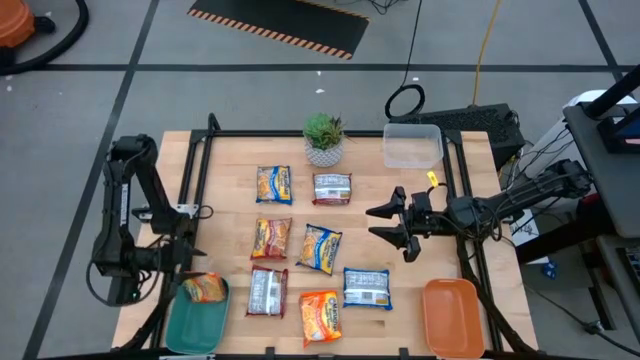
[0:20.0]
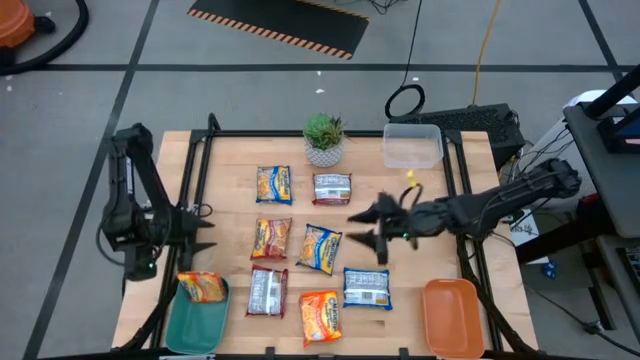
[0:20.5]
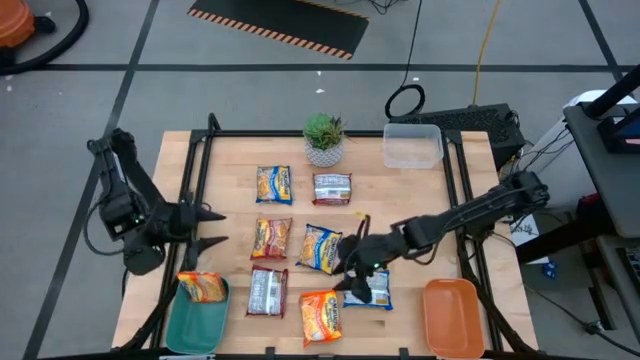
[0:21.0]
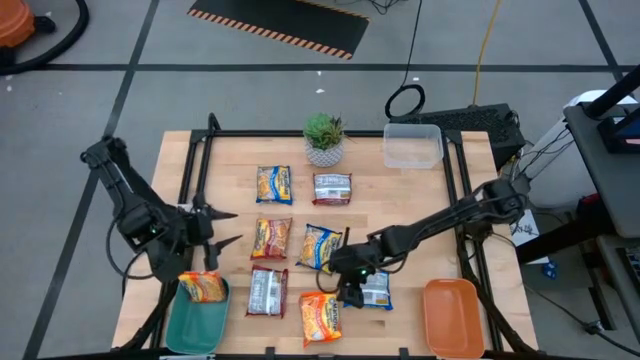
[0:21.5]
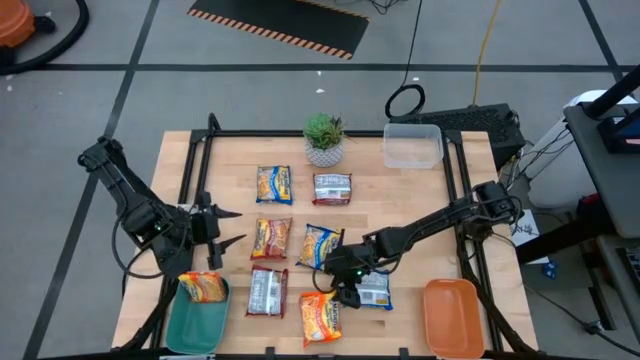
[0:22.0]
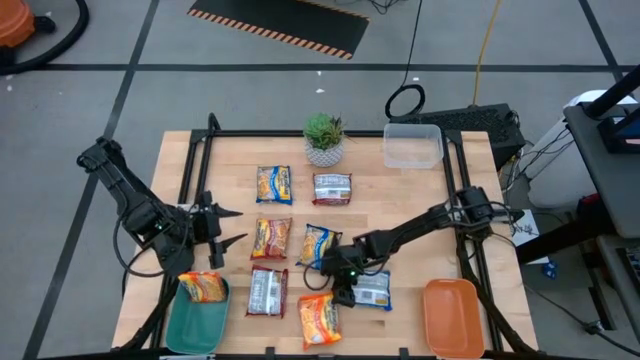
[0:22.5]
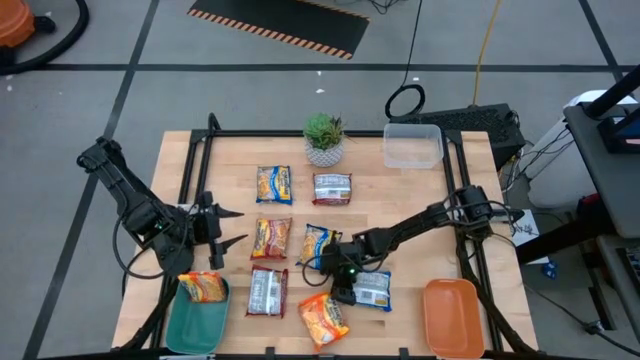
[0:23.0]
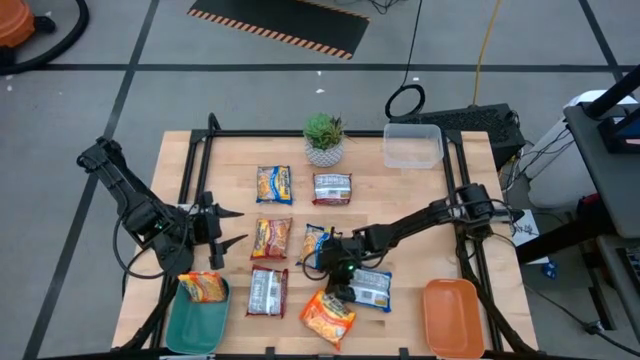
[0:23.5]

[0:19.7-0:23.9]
Task: Sort Maruchan noodles
Put the orange noodle pack into the green bin

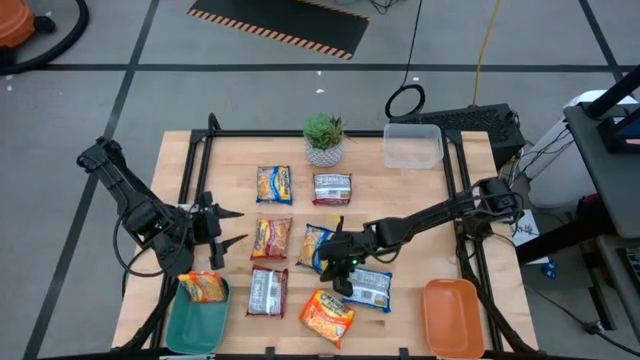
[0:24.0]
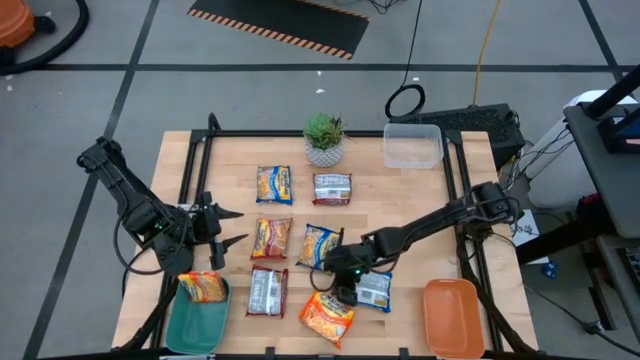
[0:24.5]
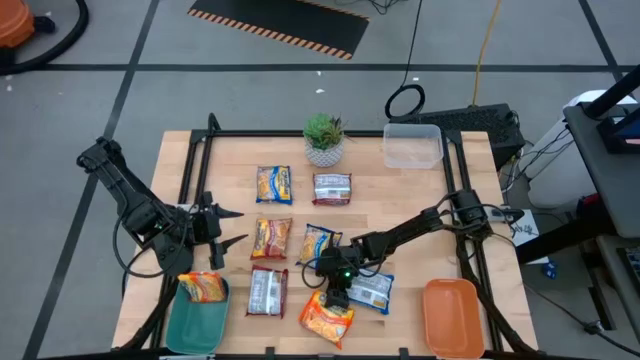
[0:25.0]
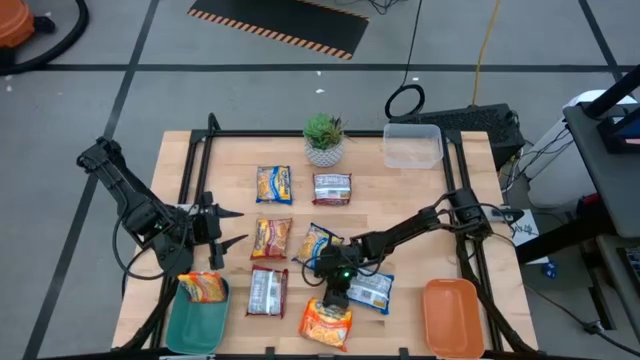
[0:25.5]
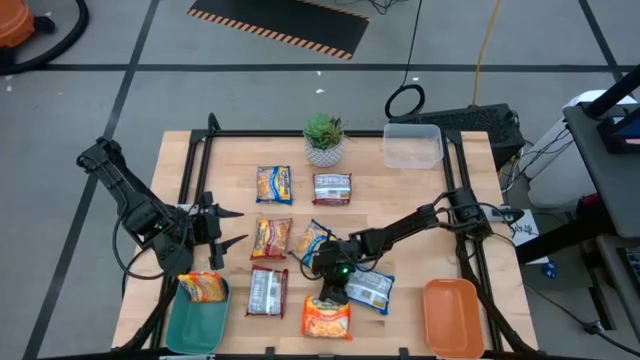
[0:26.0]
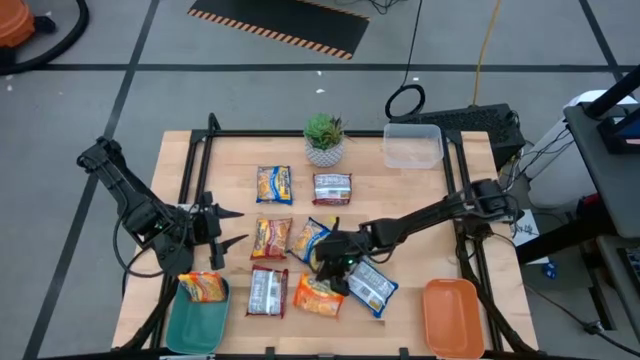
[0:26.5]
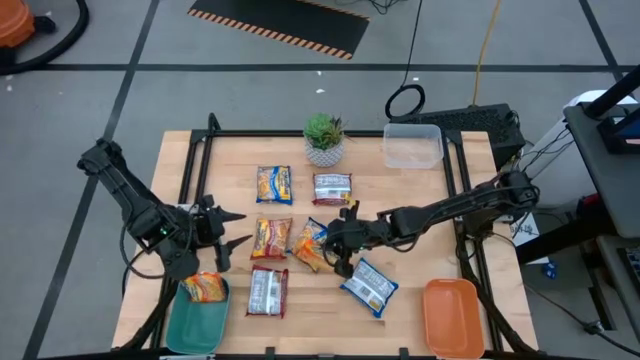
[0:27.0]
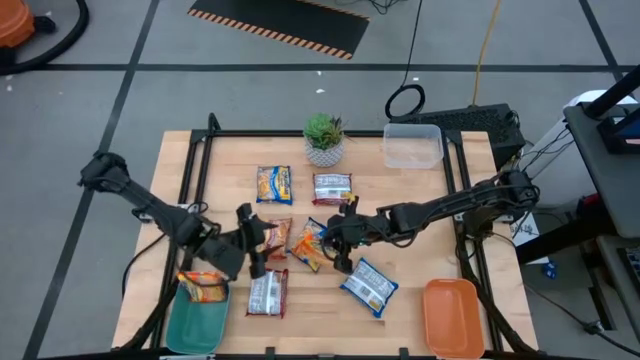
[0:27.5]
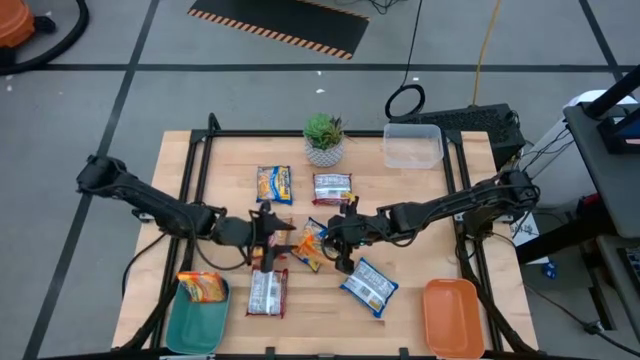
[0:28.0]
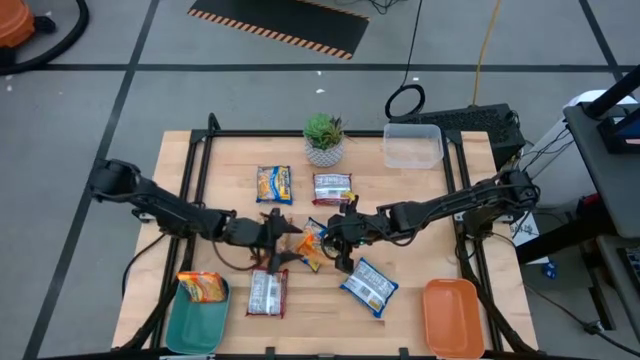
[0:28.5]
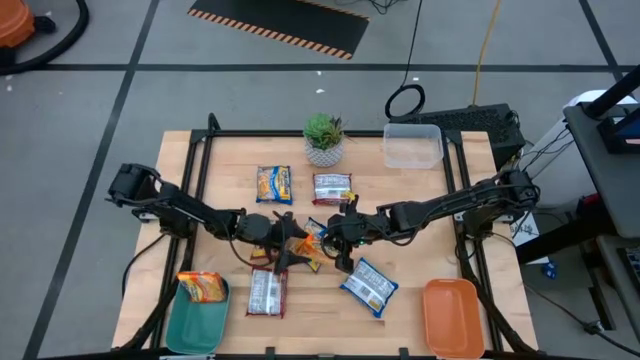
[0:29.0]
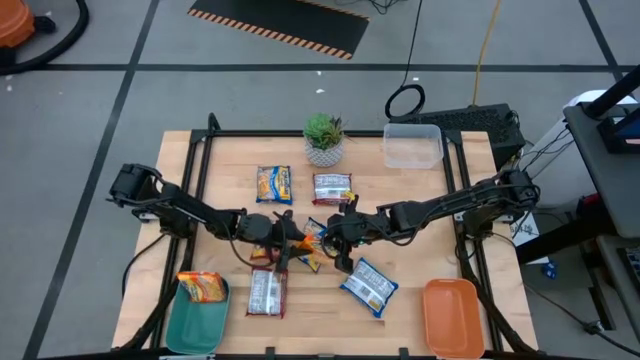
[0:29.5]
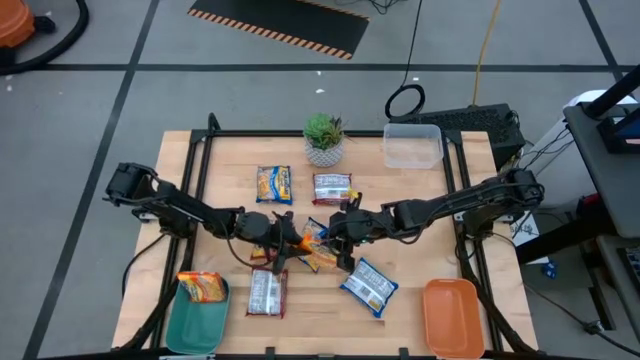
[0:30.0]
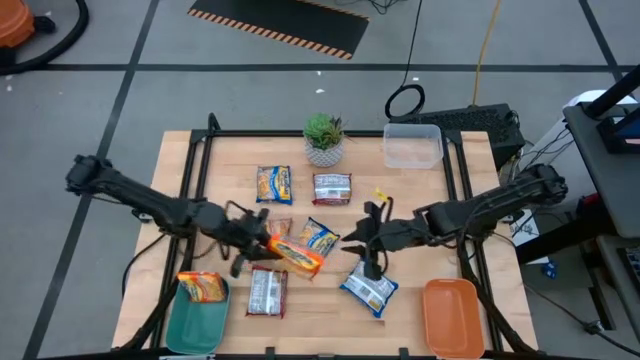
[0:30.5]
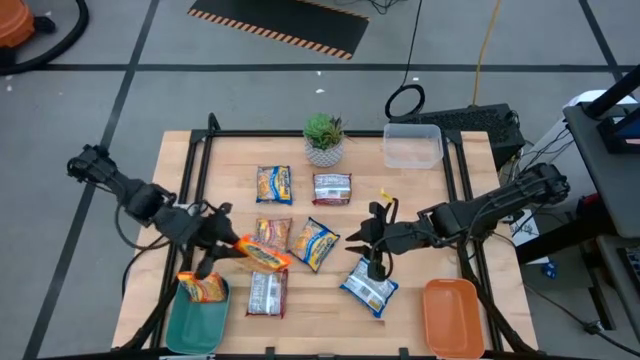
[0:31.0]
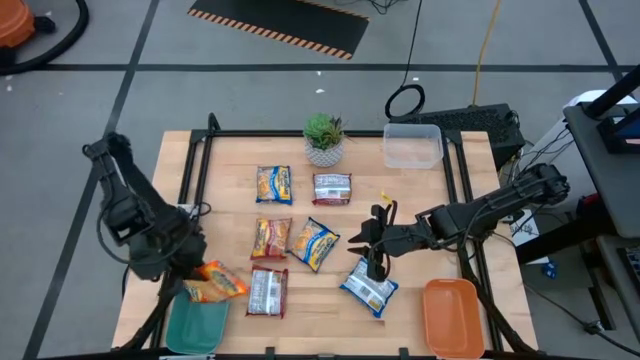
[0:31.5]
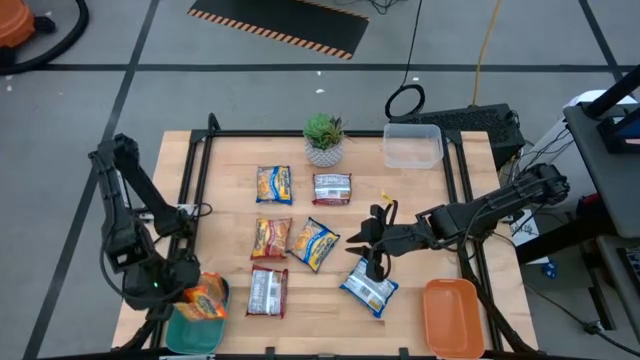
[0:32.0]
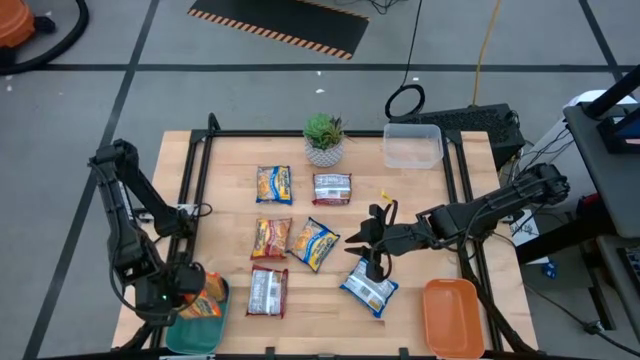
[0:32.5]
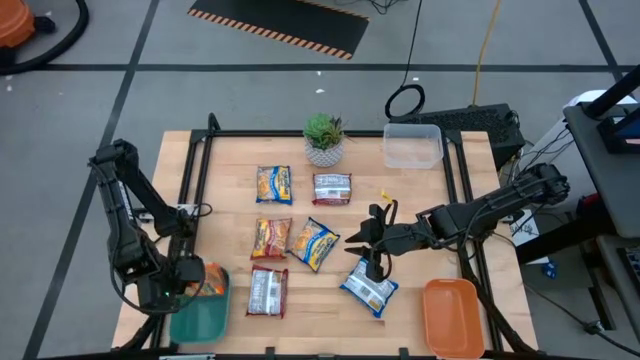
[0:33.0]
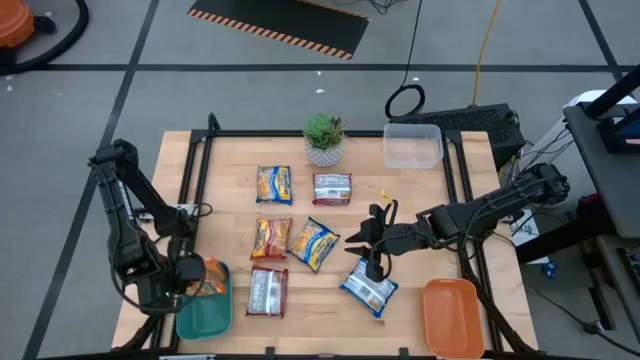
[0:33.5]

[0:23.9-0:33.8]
Put the orange noodle pack into the green bin

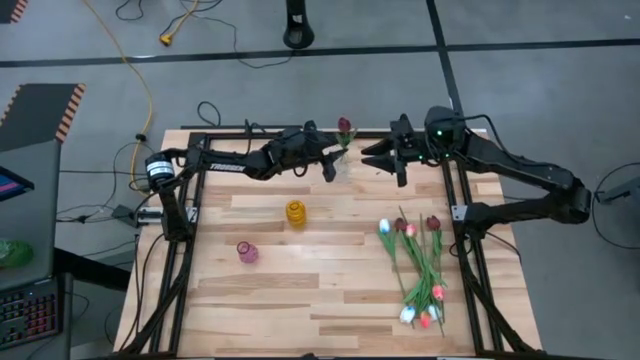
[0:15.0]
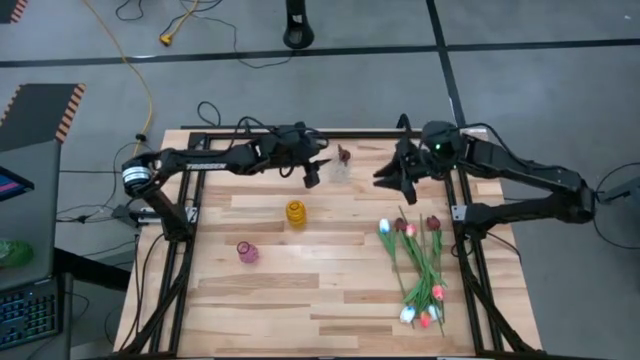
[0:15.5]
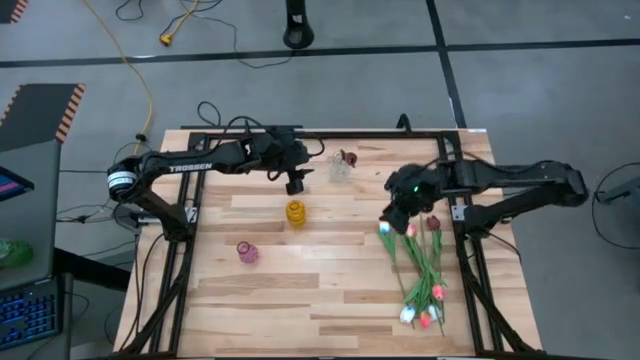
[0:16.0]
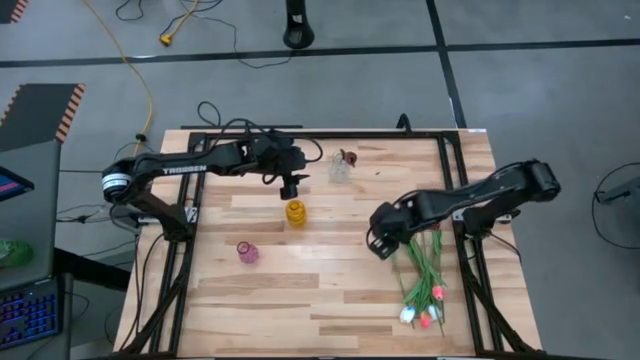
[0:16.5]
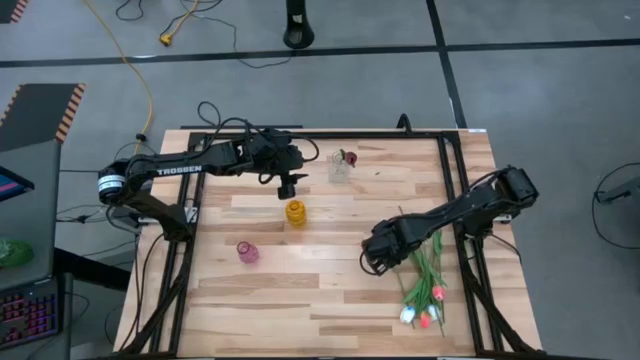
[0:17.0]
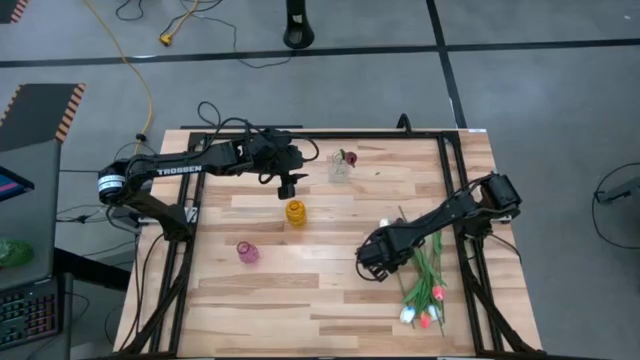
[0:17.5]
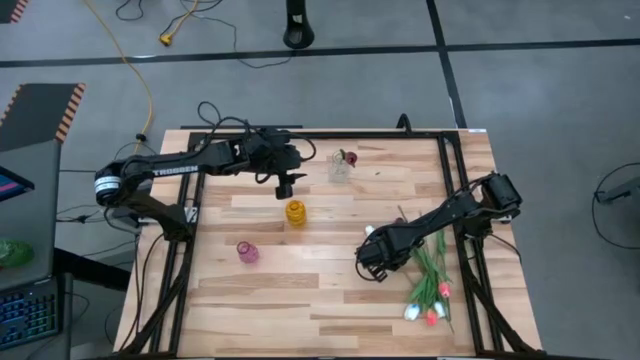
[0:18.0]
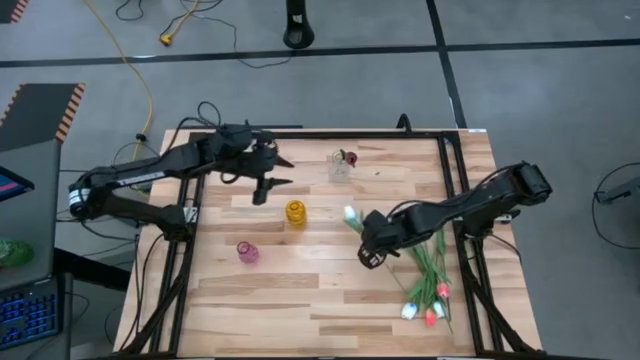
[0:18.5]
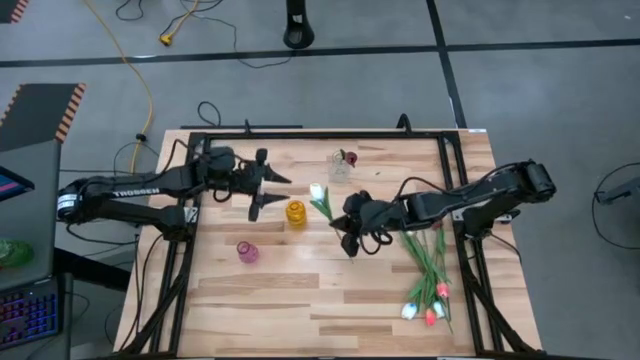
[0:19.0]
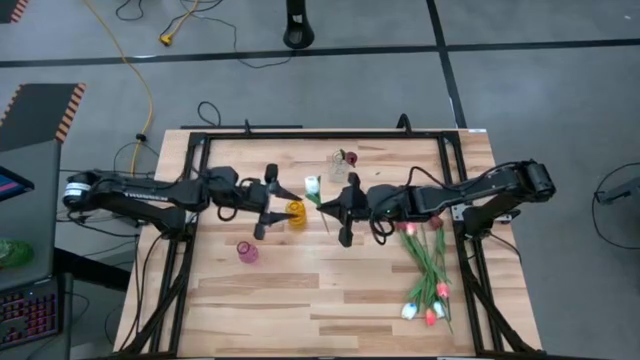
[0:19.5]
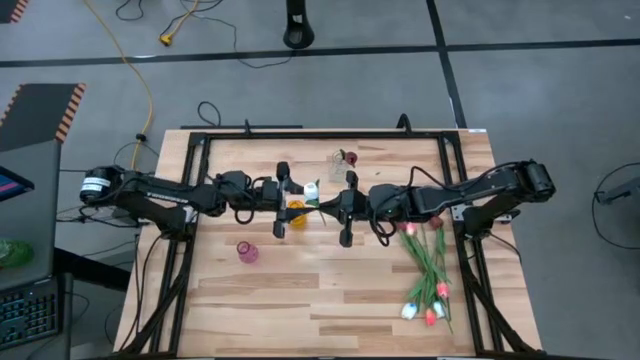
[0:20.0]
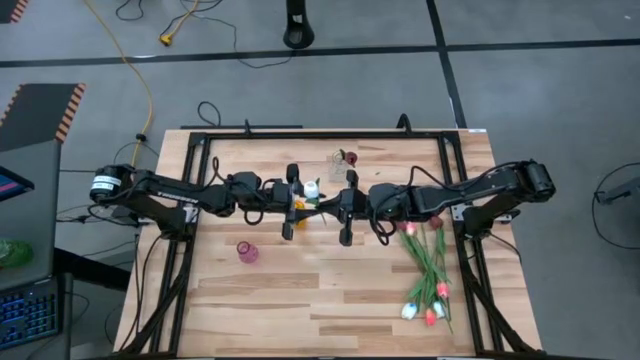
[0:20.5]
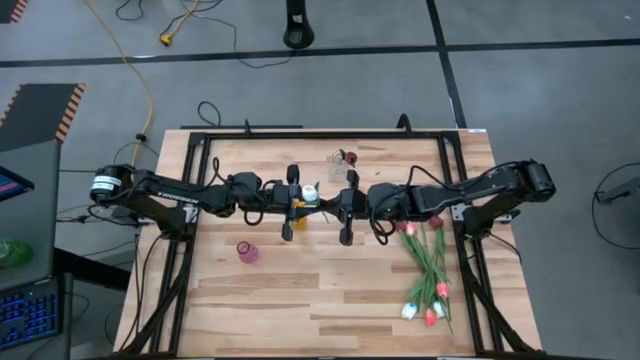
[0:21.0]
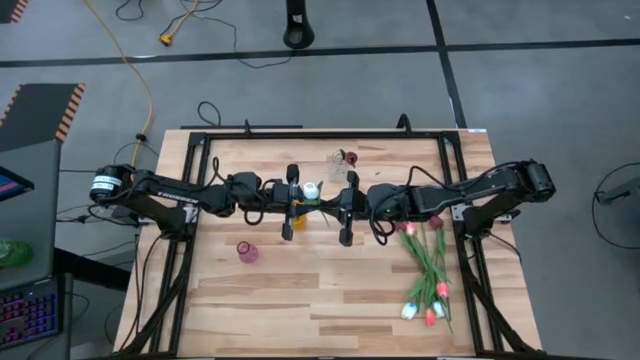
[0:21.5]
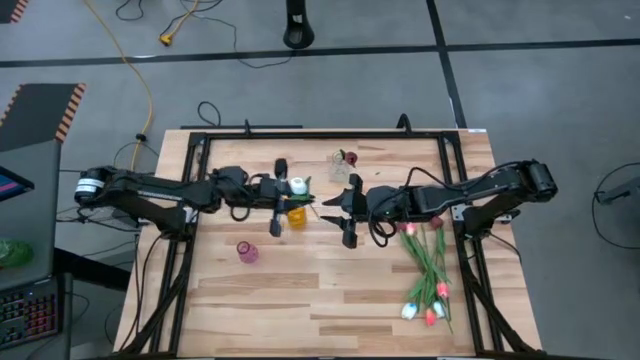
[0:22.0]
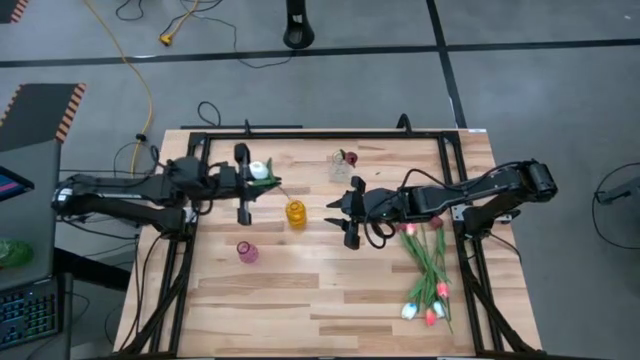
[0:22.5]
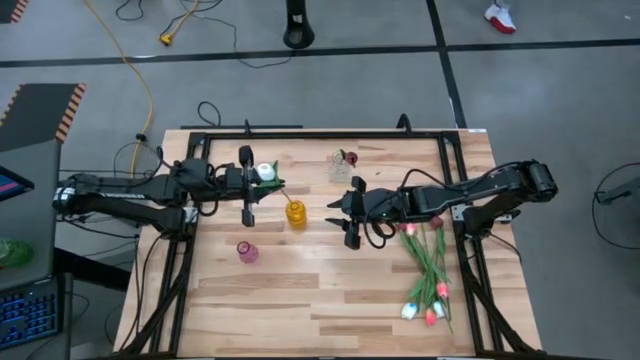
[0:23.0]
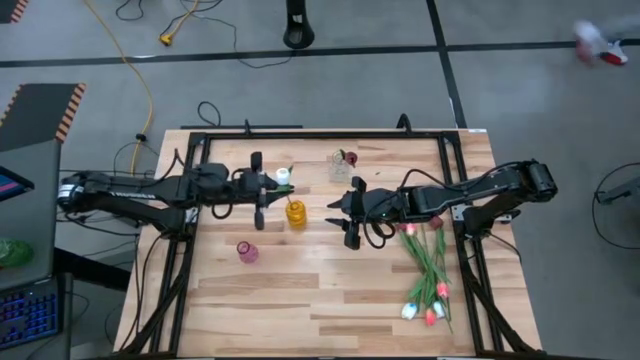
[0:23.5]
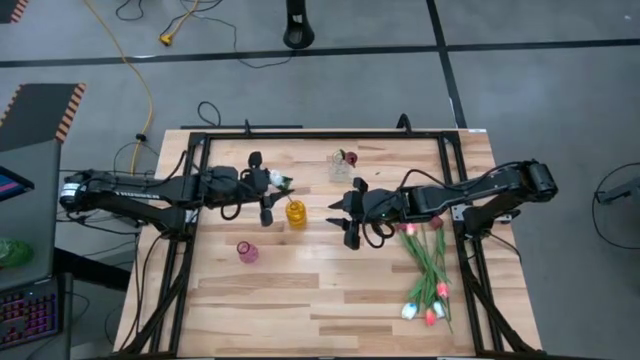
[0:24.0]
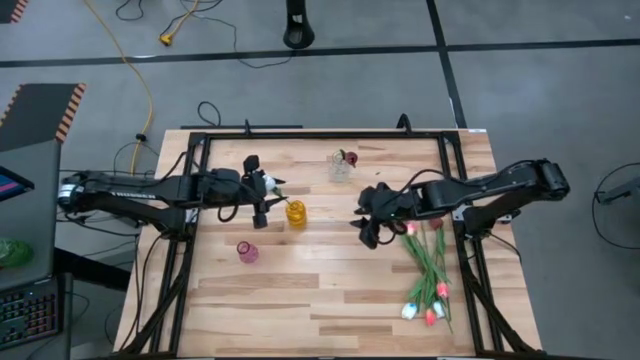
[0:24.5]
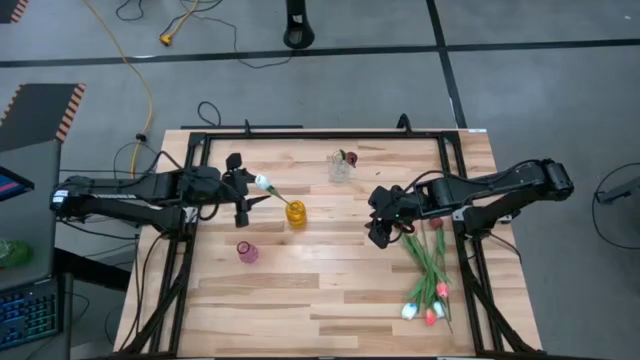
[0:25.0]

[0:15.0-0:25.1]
Task: Sort flowers into vase by color
Put the white flower into the yellow vase
